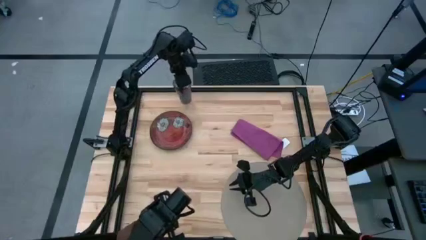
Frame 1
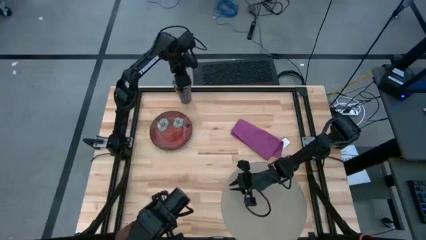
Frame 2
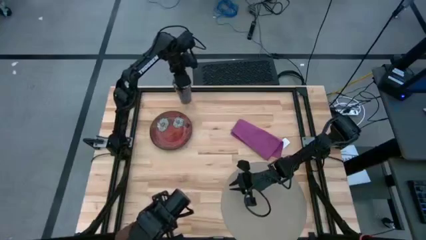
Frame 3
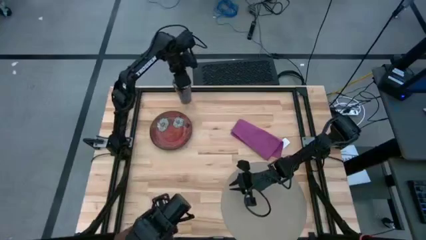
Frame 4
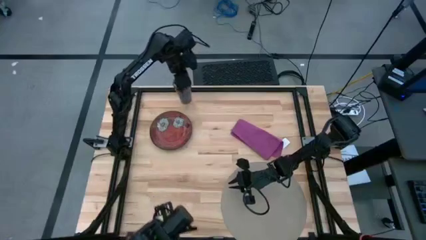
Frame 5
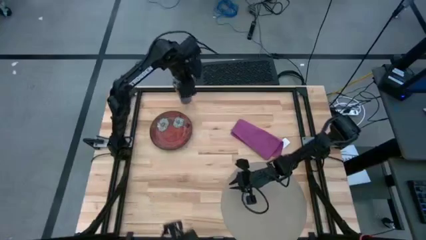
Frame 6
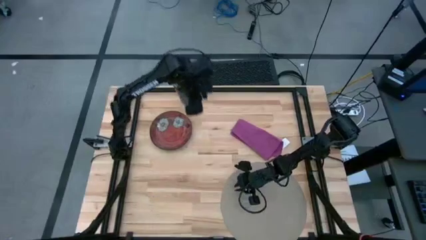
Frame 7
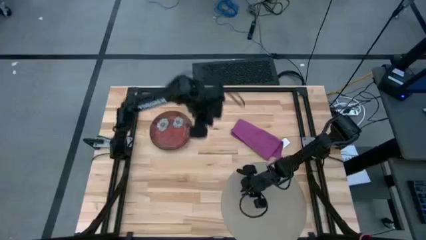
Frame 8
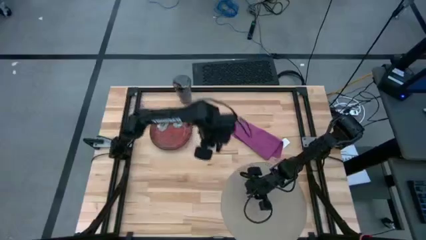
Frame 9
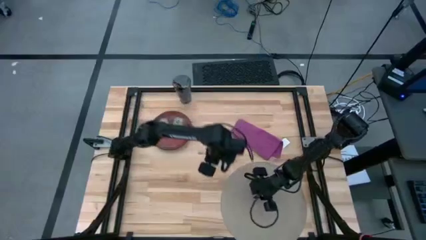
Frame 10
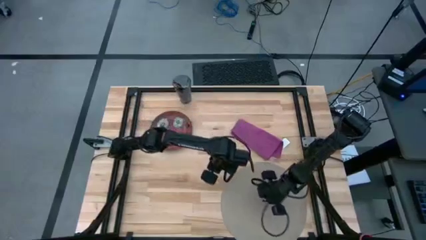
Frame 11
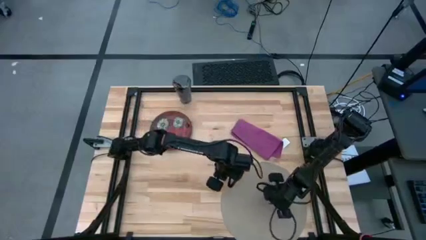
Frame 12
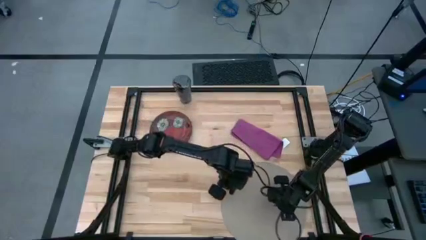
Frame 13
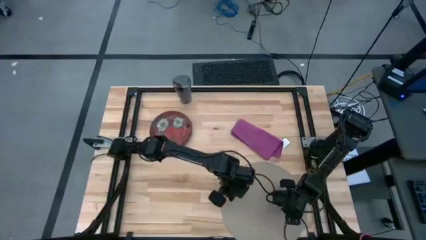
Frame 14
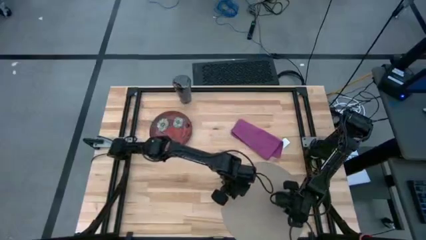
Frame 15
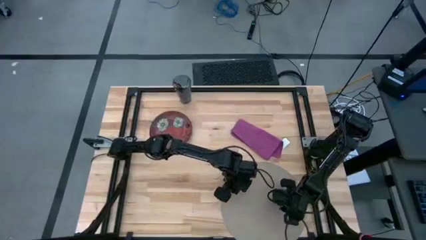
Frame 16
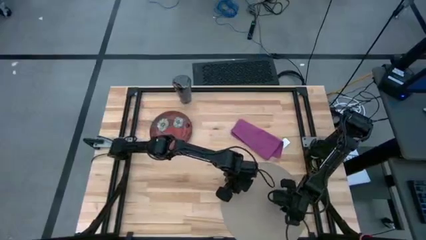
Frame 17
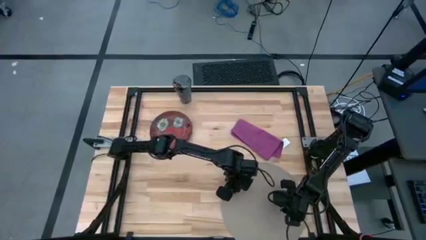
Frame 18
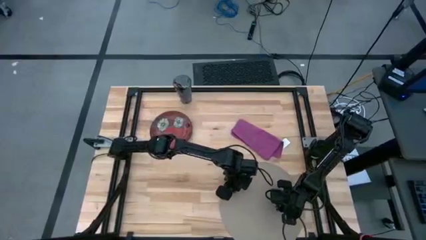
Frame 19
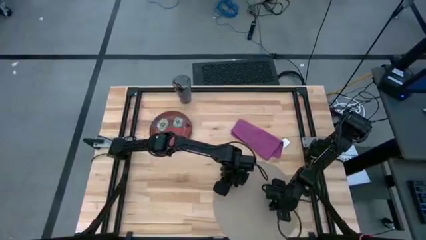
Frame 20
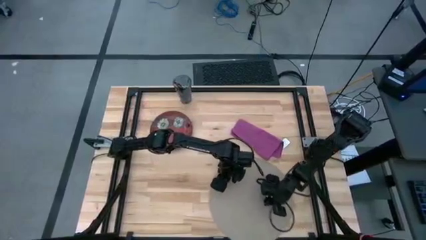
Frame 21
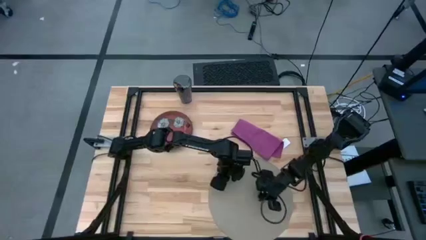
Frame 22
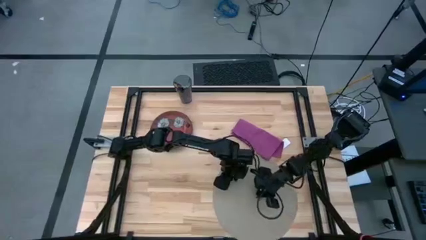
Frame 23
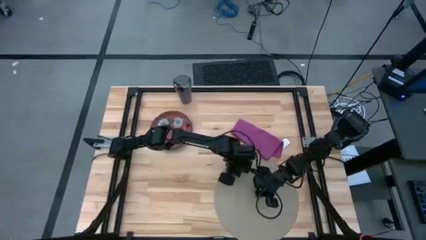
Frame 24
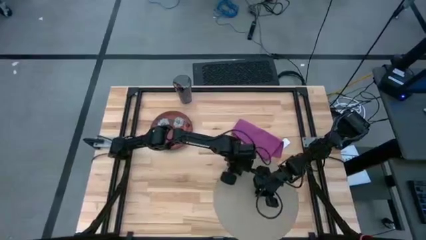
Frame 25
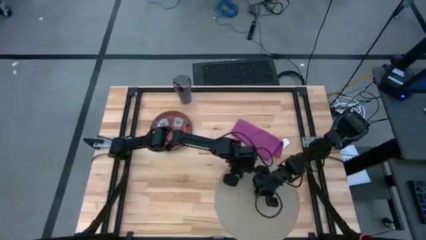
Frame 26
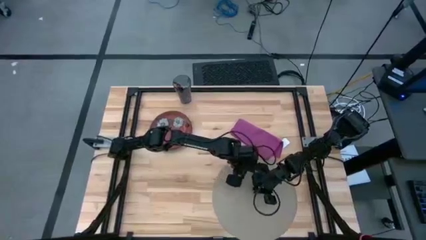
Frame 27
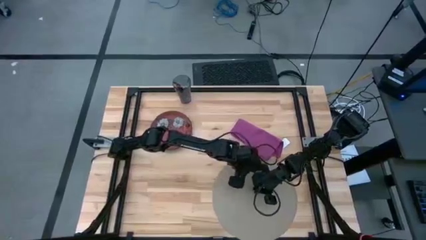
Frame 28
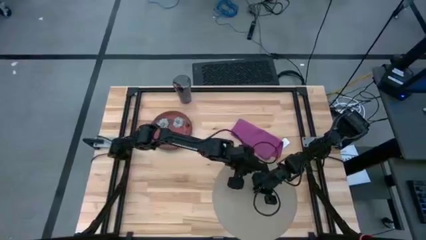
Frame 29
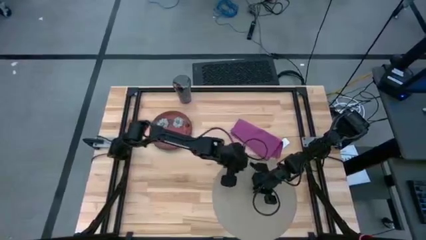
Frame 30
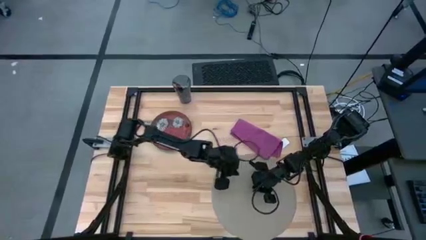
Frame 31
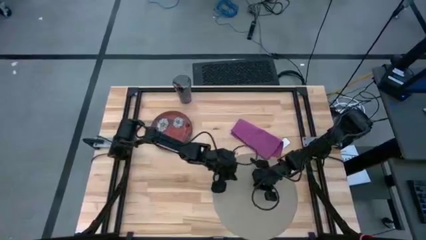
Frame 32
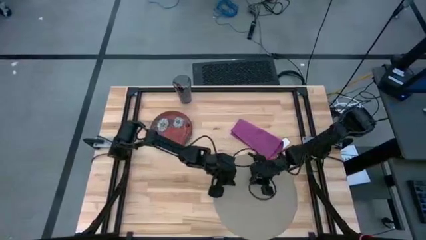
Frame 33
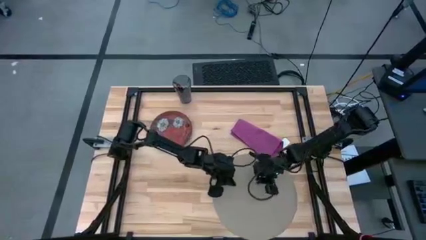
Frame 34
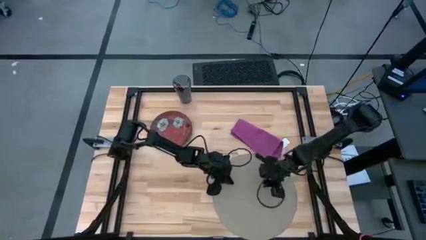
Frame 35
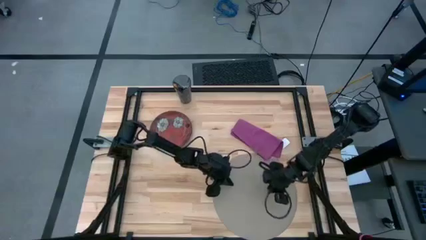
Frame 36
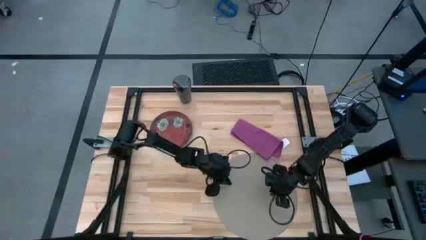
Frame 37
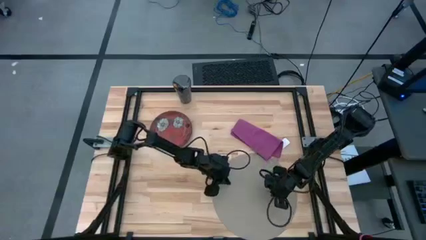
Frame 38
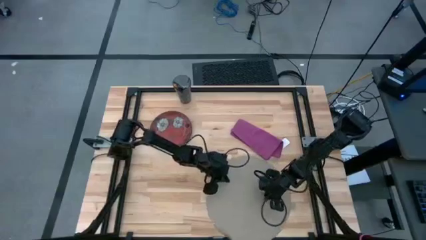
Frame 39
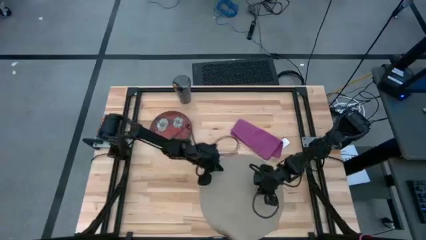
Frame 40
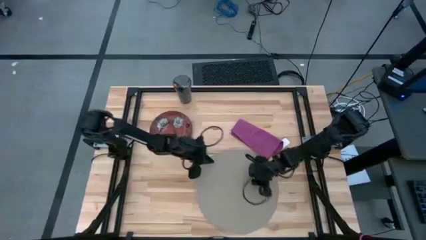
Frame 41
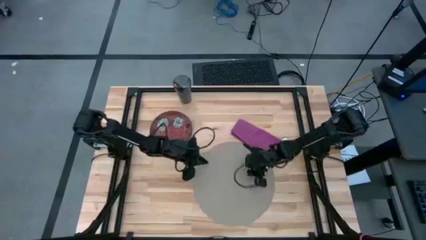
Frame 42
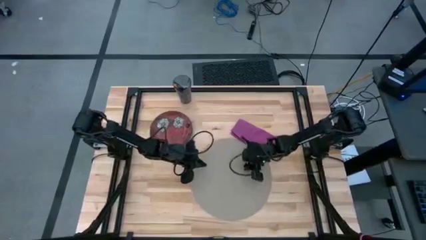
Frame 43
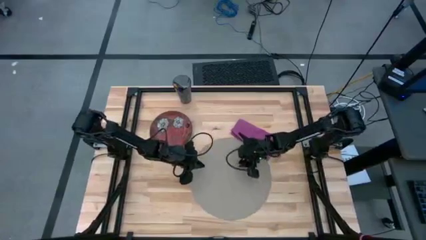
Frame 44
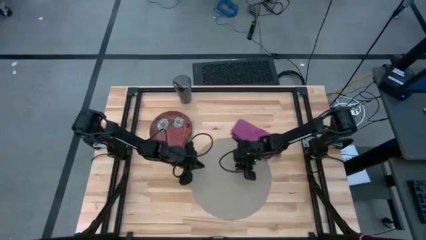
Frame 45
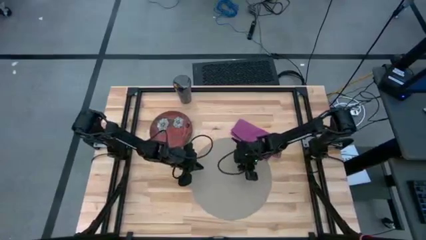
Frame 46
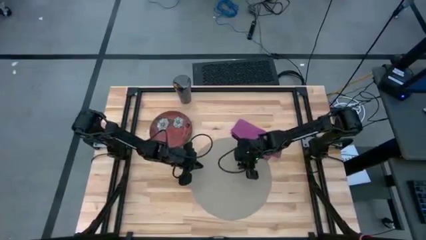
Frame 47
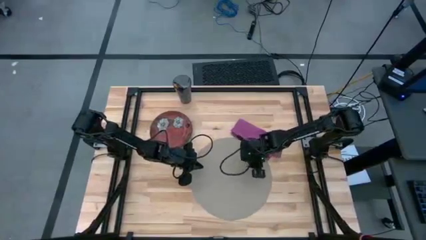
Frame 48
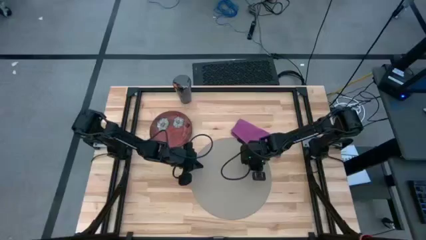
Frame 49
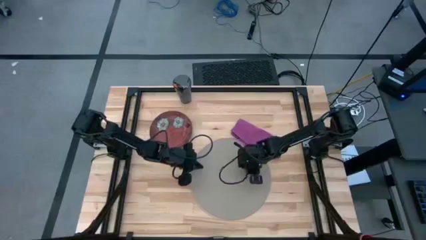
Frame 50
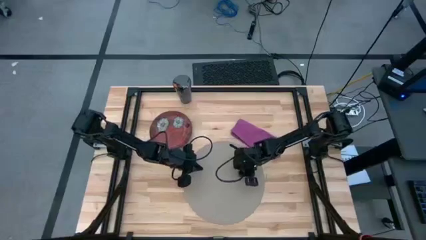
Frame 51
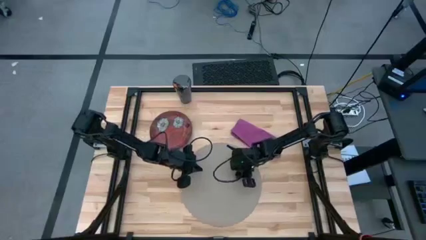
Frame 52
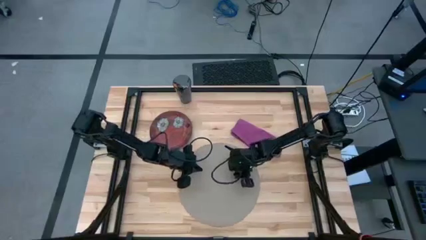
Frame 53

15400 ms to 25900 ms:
Task: Set table place
Move the gray table mat to the center of the table

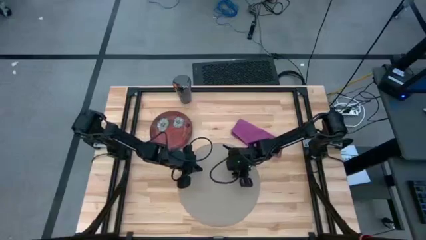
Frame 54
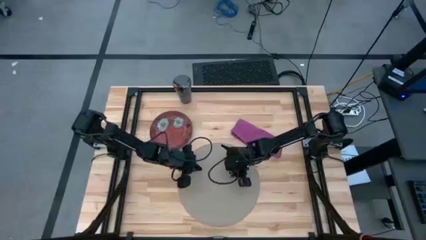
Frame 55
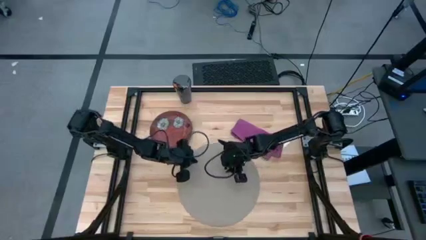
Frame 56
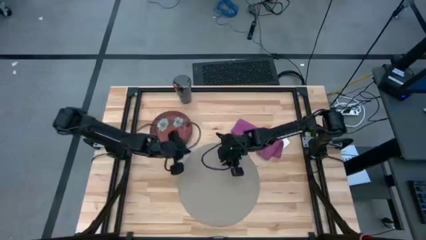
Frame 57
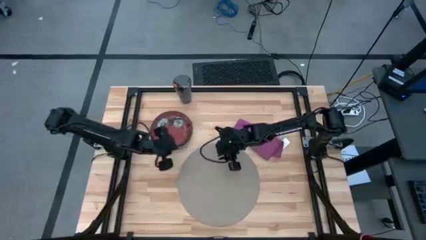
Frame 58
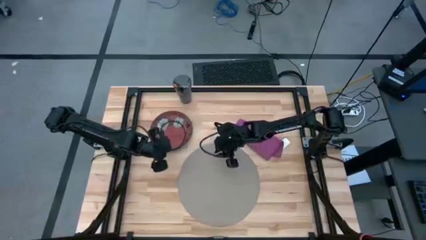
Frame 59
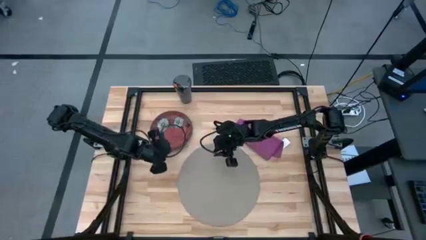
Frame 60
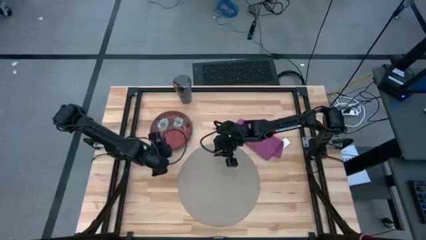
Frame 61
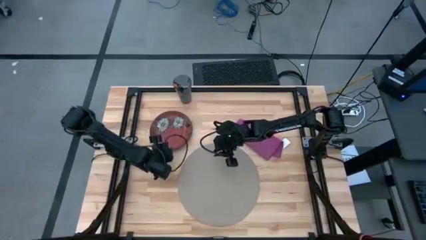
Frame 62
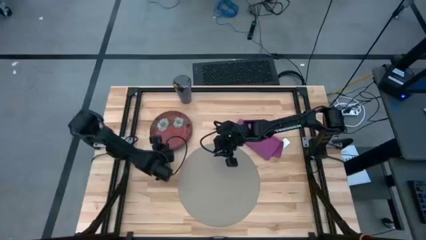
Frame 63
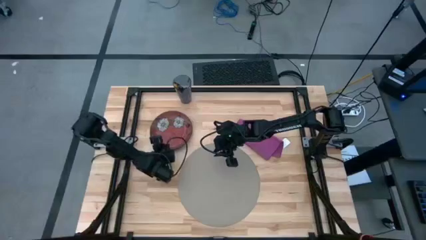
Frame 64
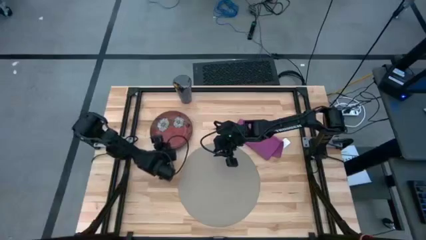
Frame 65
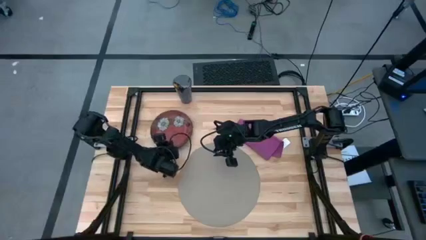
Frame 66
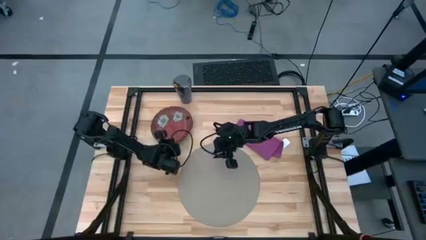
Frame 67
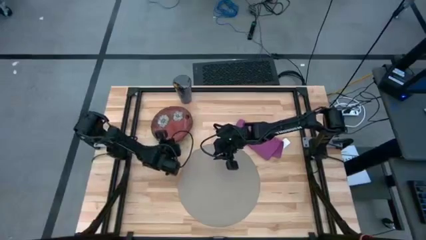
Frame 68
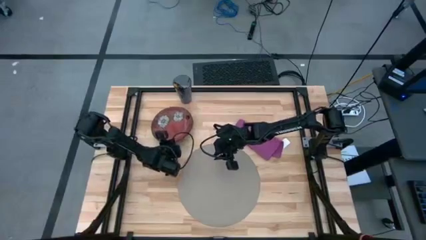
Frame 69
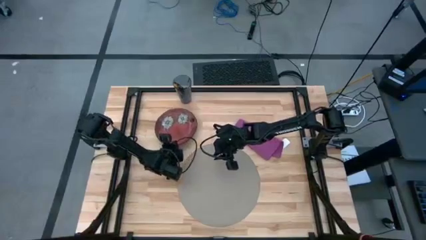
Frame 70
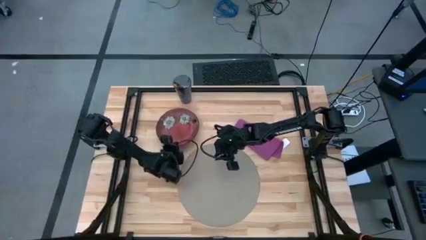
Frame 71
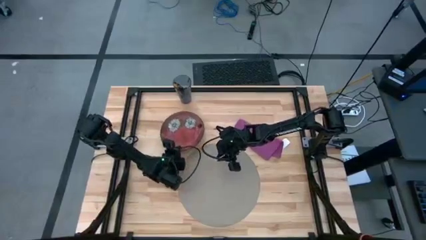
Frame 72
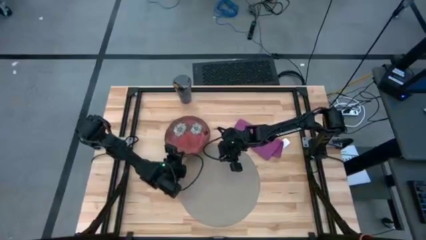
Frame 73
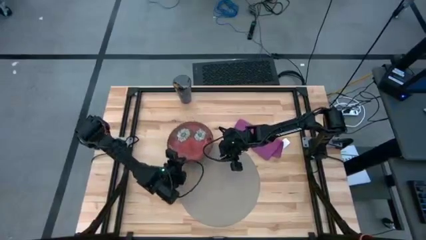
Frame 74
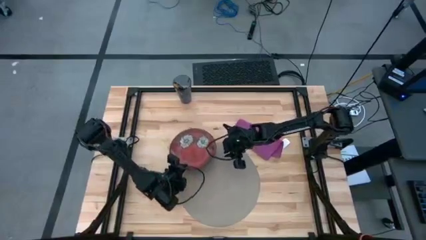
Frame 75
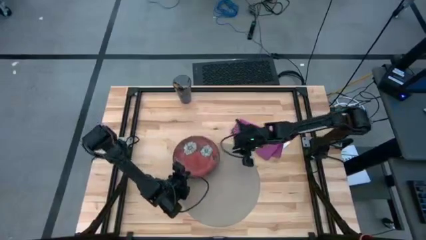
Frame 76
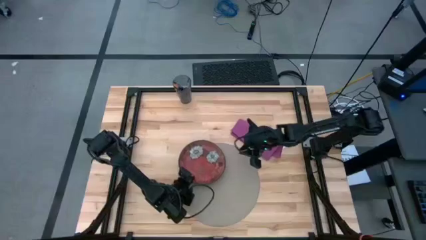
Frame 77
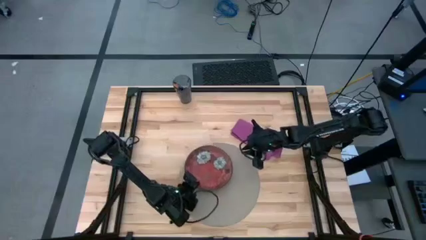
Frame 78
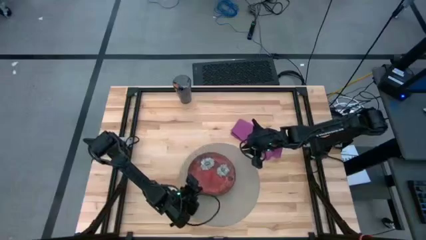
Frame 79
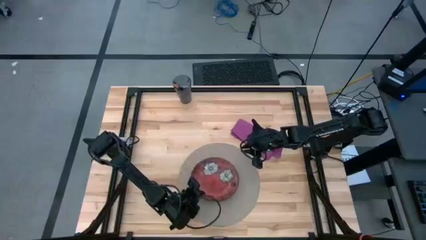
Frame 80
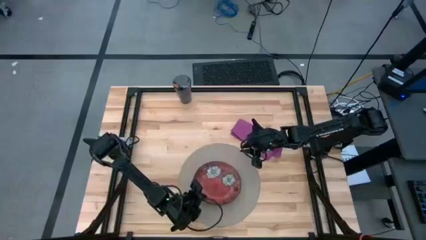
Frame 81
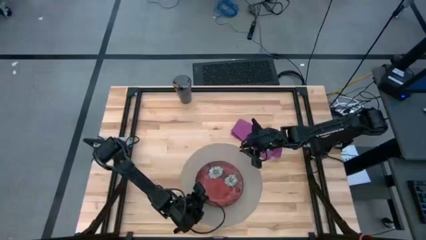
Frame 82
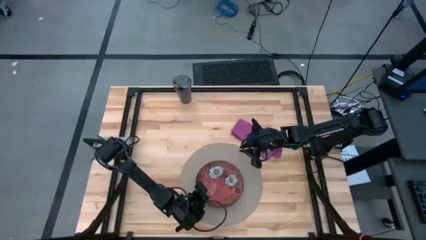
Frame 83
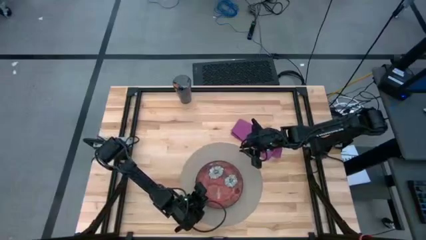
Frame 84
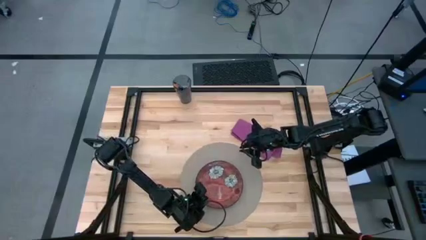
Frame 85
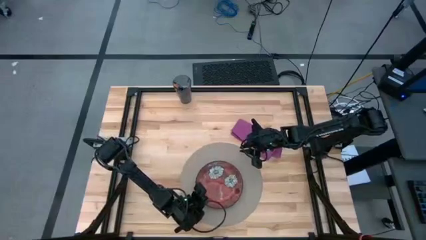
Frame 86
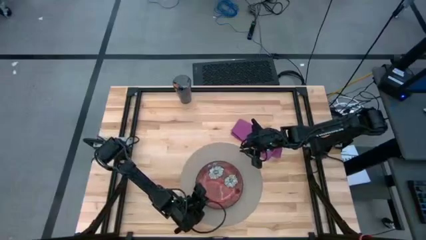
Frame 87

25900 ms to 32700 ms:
Put the red plate on the gray table mat
